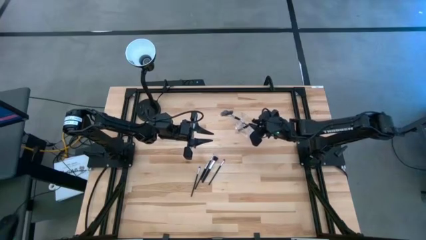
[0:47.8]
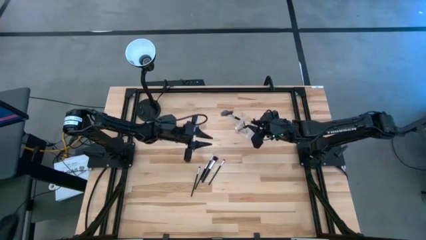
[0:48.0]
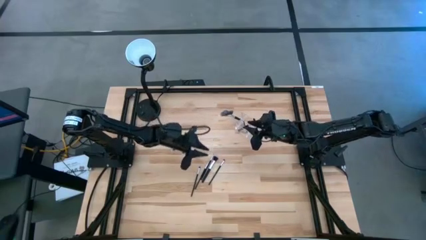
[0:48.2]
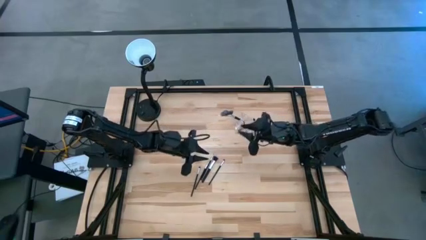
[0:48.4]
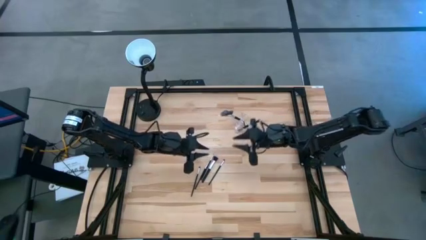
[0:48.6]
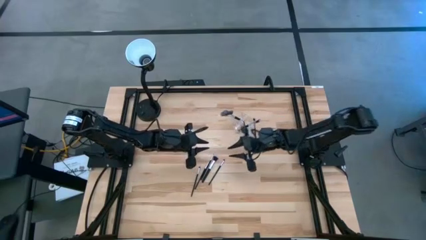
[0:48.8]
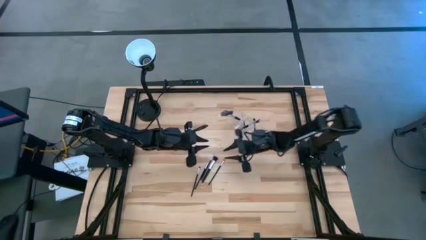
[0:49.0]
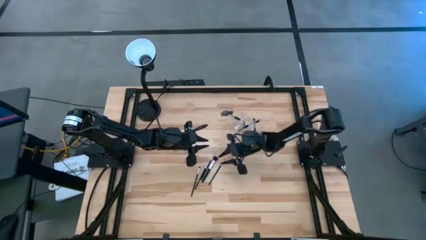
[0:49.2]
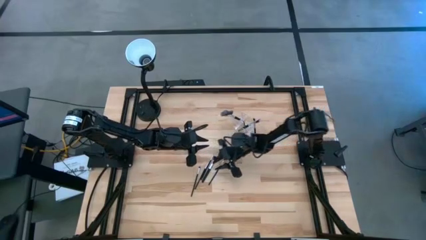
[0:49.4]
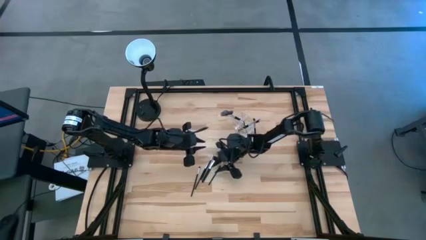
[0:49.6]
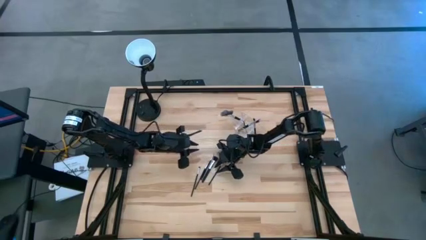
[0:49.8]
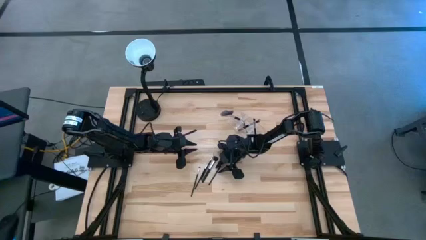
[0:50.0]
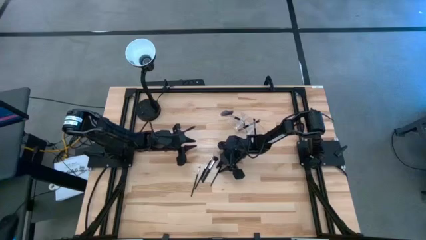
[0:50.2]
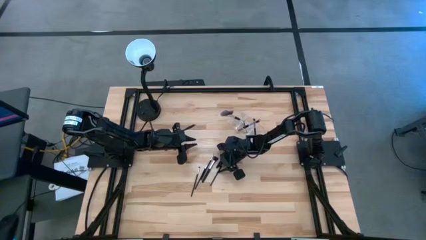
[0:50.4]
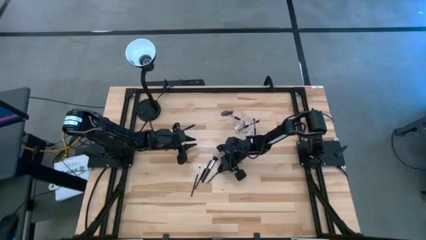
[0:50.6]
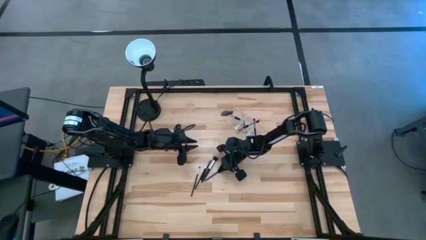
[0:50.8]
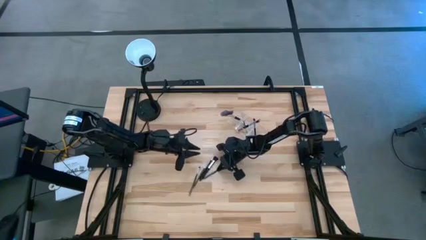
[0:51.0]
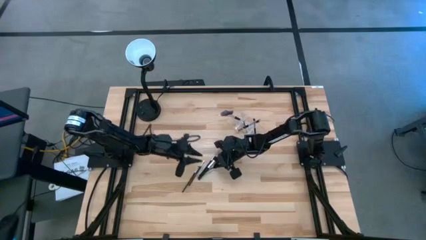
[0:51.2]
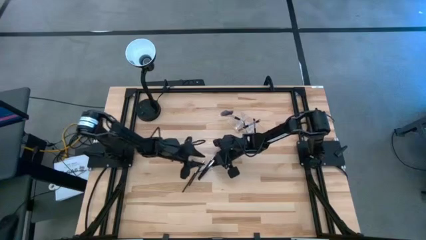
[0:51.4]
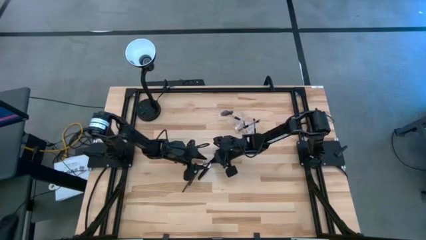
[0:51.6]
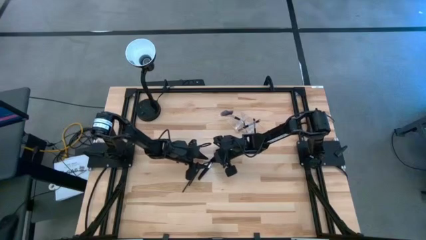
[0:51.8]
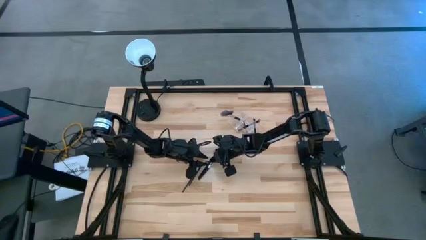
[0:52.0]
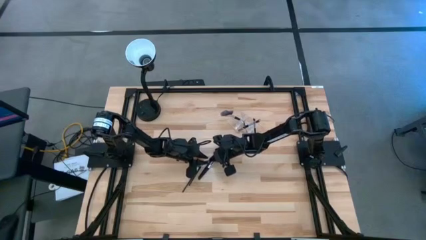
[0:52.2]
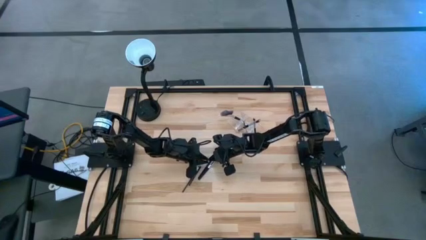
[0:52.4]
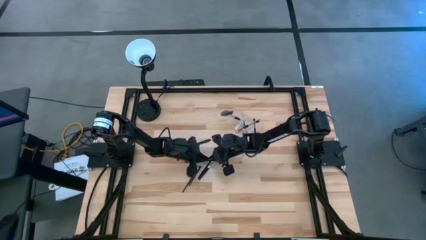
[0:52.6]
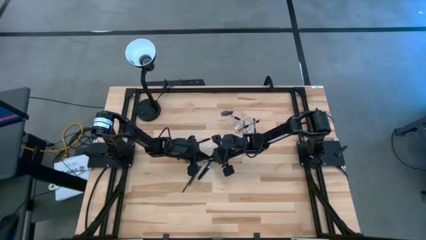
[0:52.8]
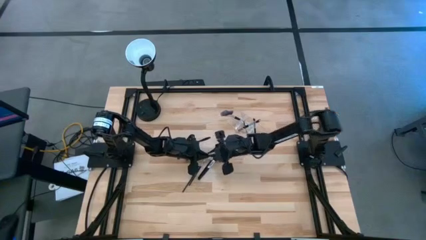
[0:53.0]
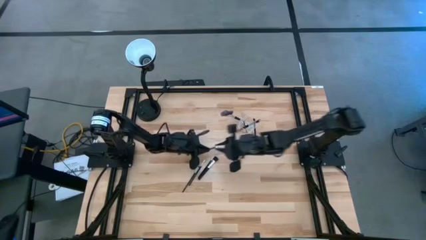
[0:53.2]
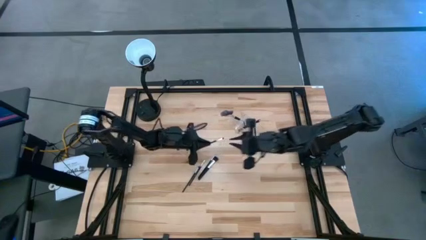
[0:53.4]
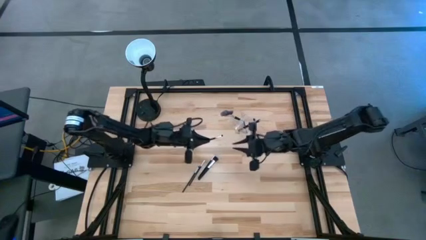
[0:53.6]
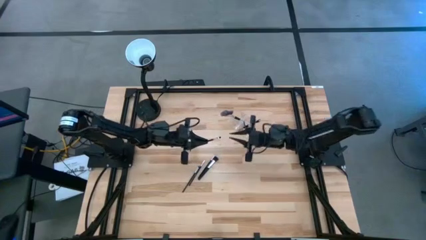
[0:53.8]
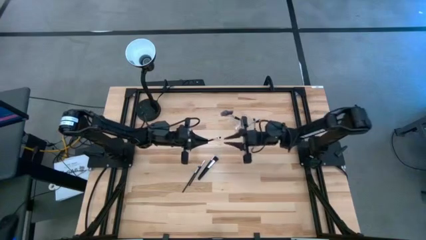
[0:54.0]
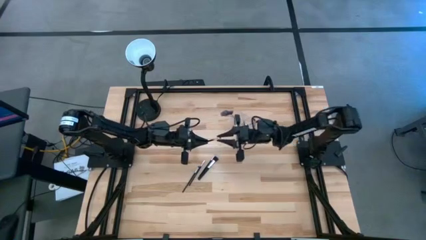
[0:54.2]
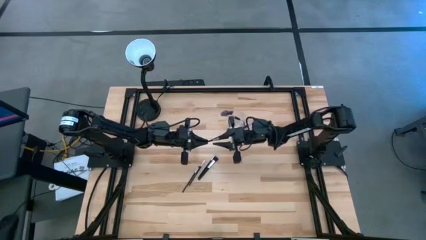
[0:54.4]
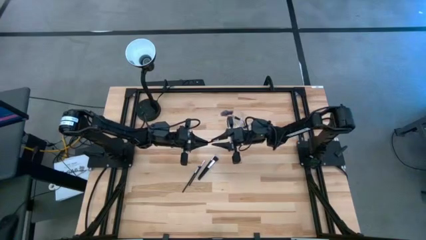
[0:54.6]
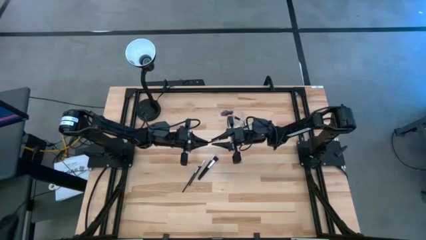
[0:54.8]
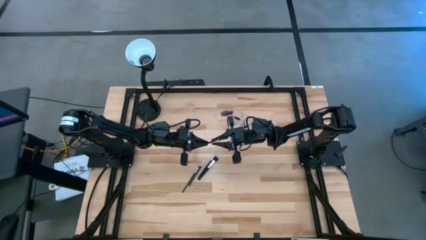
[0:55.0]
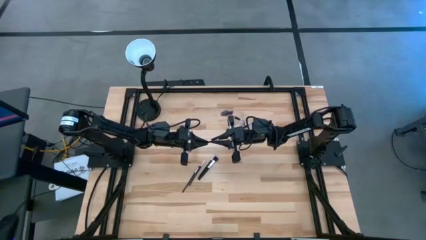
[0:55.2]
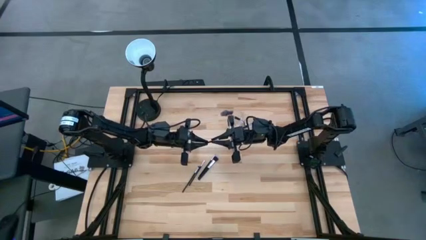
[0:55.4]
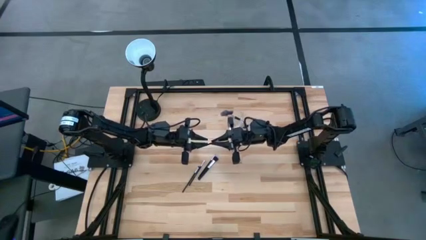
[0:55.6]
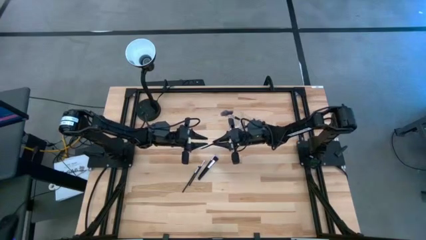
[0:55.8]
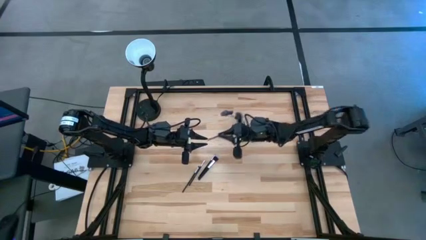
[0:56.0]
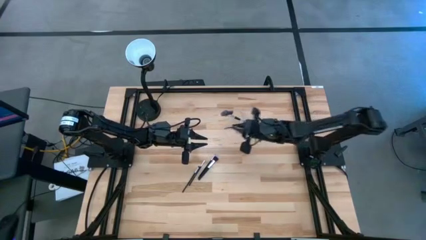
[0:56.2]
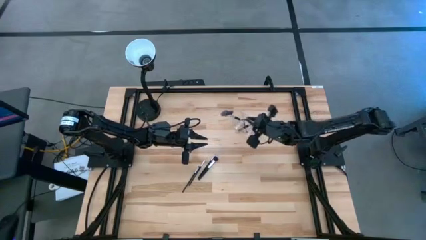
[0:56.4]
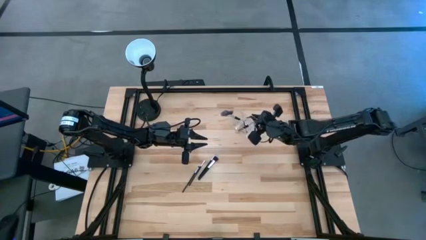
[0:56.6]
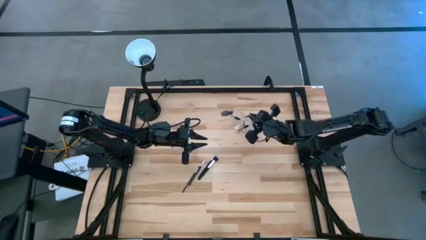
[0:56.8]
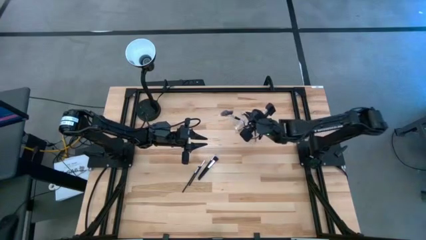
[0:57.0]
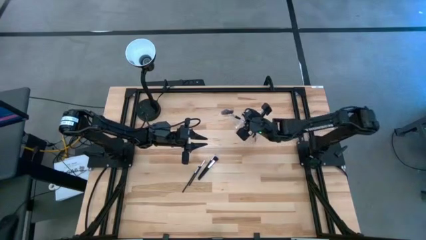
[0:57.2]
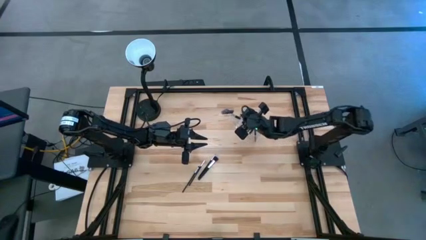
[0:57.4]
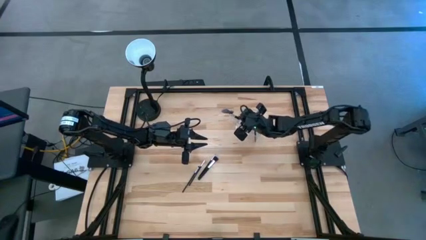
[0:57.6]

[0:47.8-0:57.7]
Task: Sort items
Put the eyeshadow brush into the left side of the transparent organizer

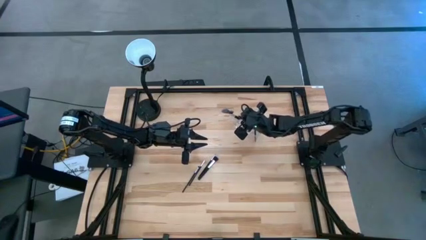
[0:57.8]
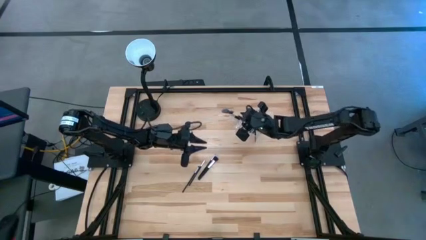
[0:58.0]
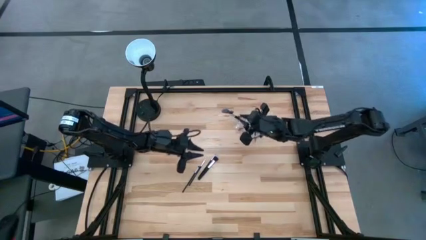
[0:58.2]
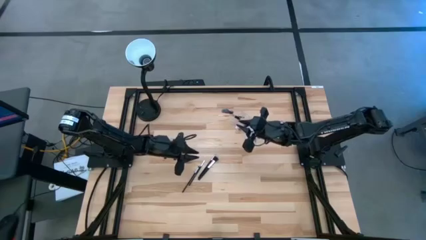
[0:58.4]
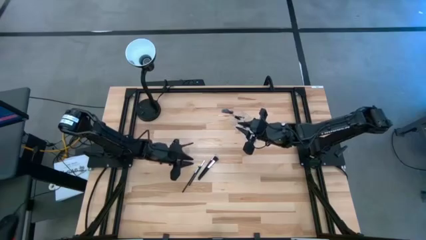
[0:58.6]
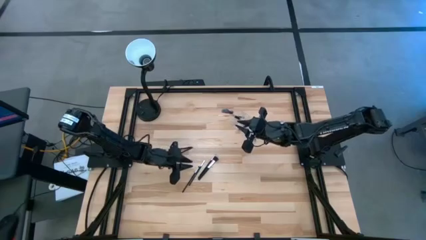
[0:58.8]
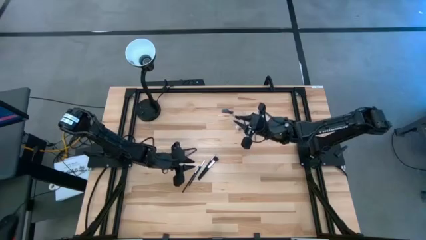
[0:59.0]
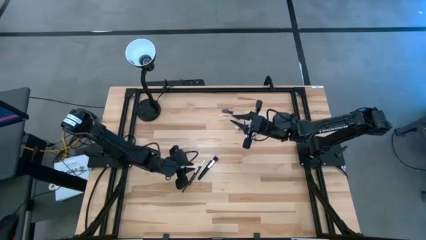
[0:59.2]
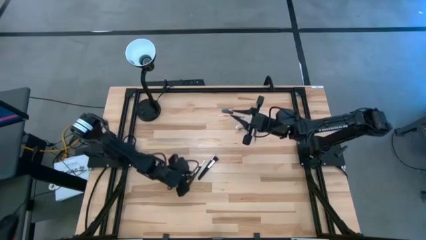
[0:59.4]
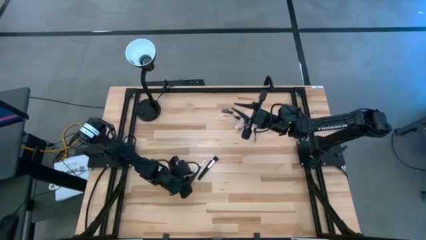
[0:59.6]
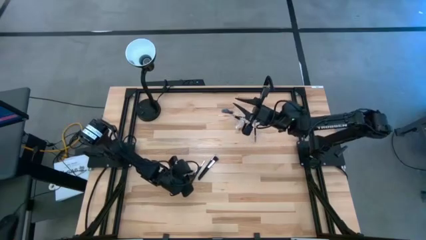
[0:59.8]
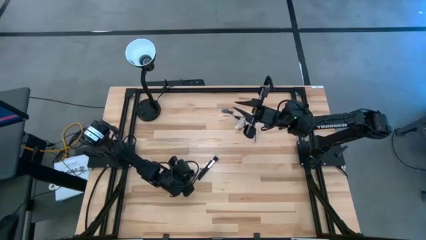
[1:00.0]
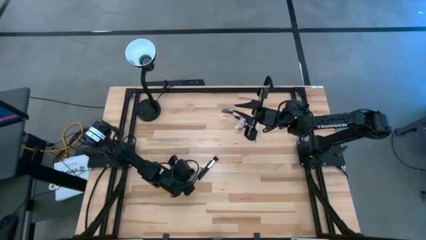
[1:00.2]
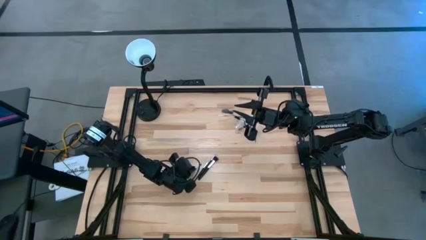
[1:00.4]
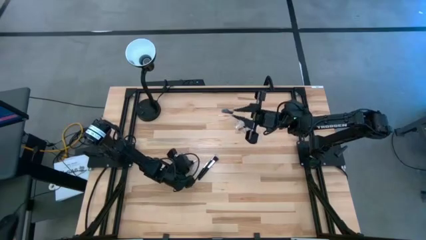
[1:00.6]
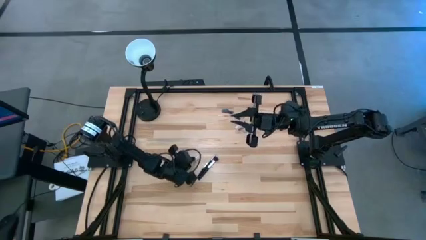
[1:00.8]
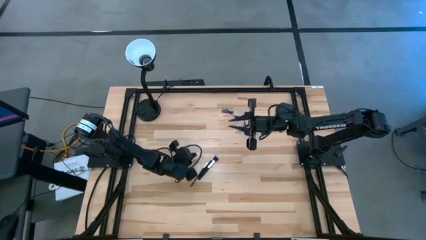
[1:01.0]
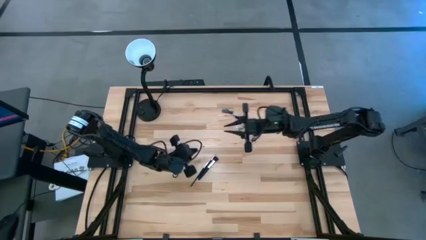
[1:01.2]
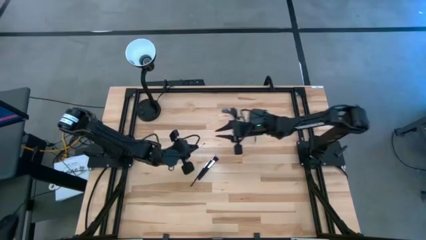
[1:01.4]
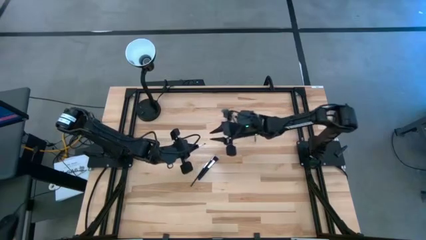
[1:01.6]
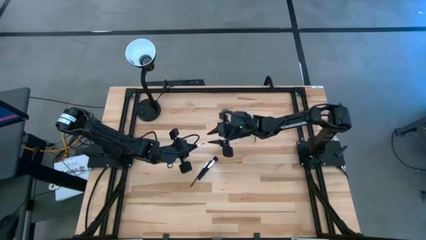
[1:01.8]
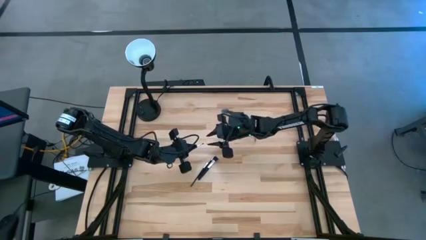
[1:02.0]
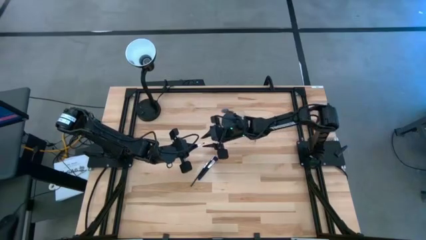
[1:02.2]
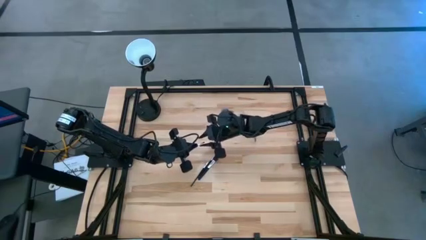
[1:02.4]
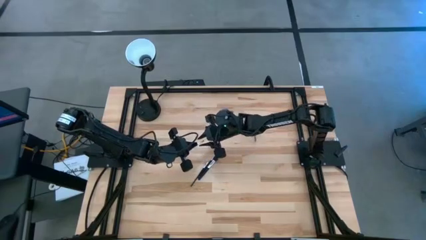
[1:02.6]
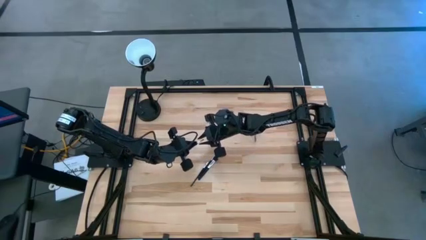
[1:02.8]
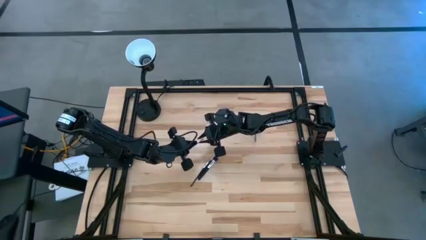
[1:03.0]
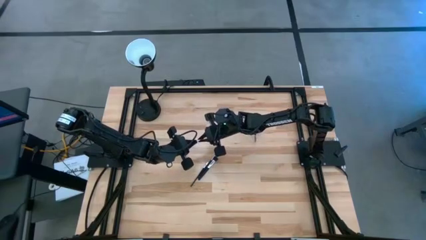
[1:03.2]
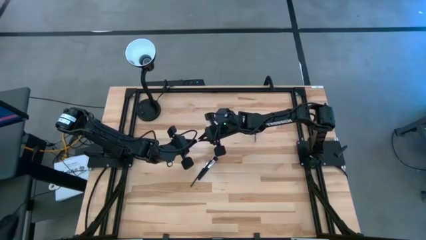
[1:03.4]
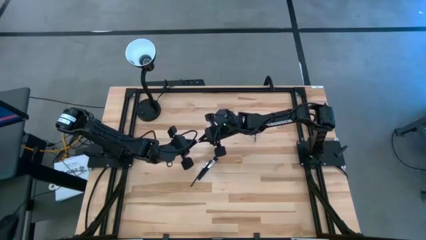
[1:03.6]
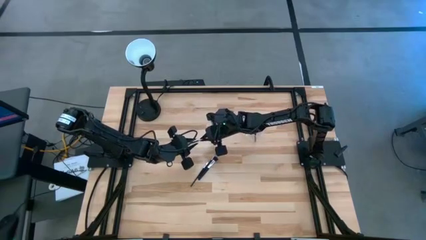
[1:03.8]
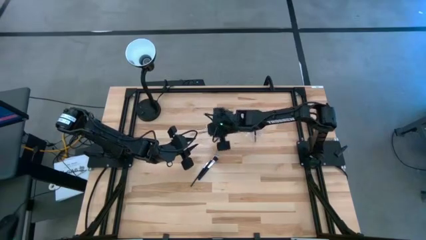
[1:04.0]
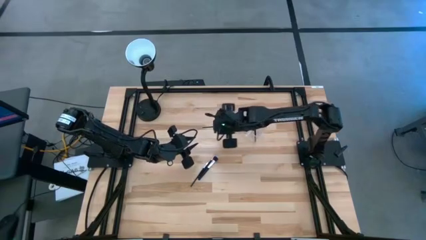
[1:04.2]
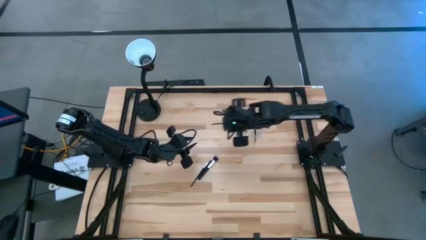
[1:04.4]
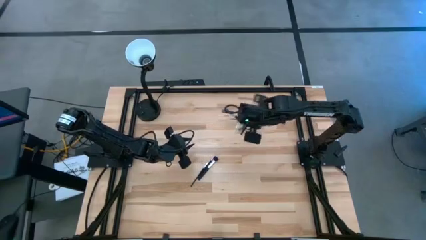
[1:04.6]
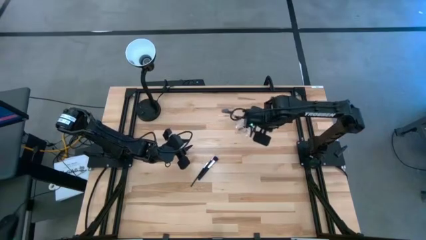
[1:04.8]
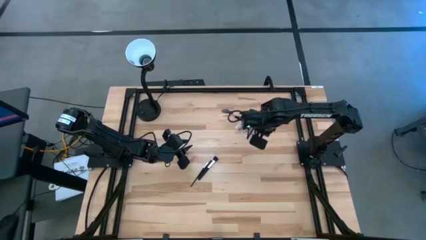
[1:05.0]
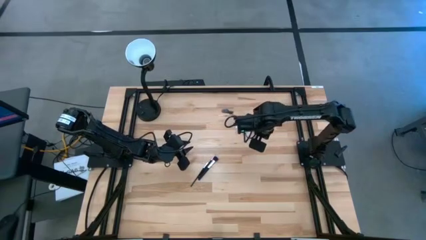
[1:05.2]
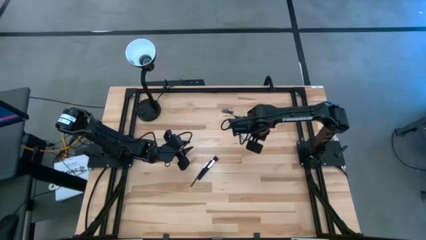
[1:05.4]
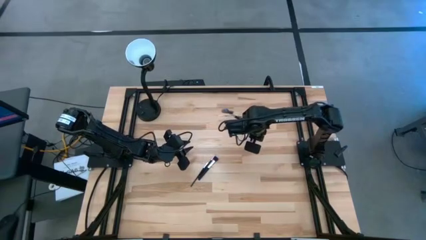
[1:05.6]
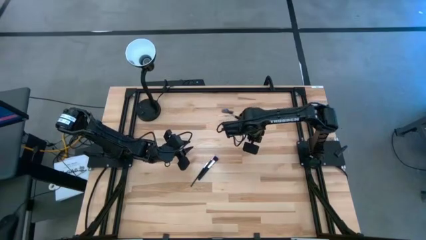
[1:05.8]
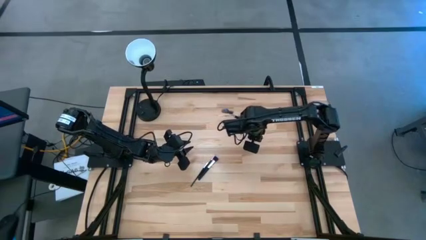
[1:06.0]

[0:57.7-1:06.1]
Put the eyeshadow brush into the right side of the transparent organizer
